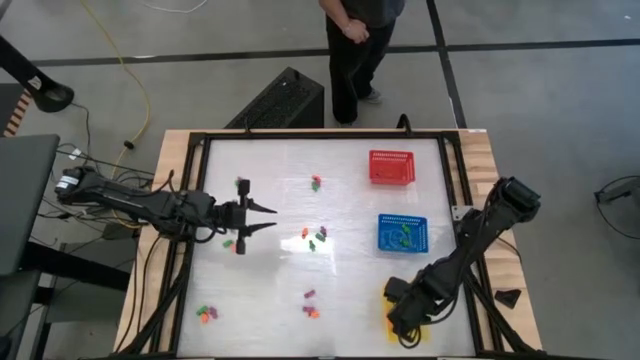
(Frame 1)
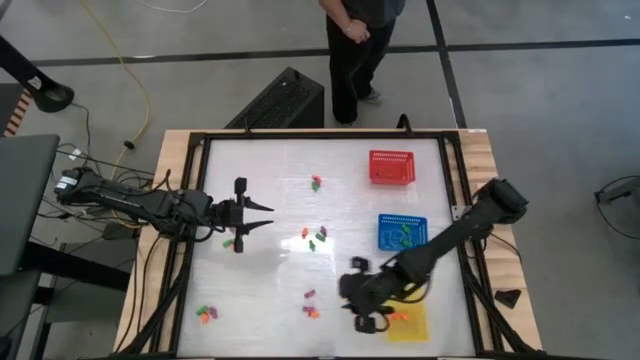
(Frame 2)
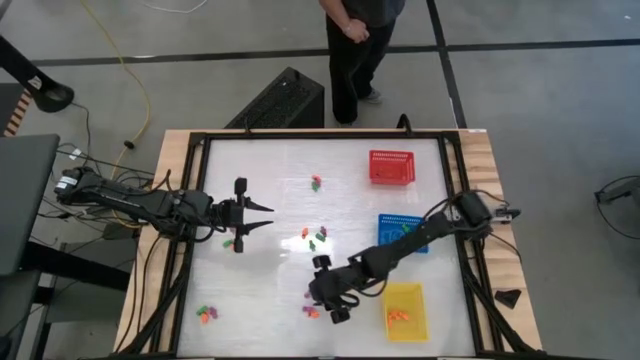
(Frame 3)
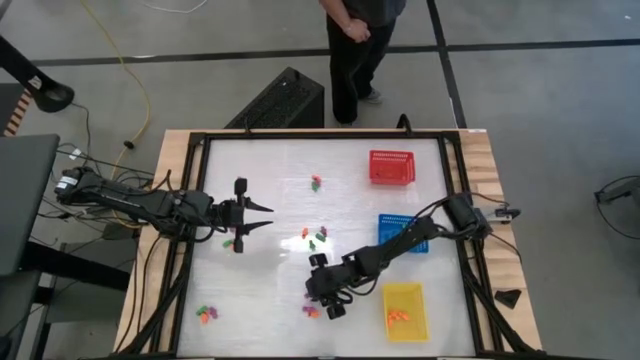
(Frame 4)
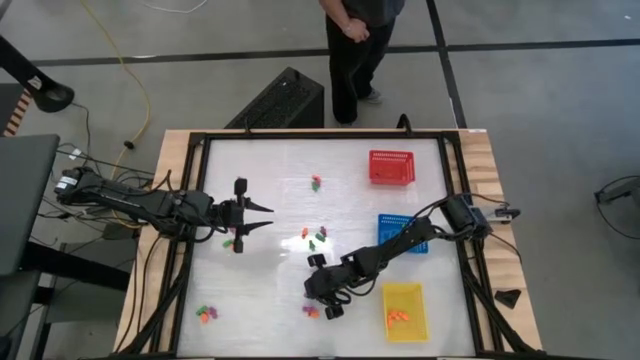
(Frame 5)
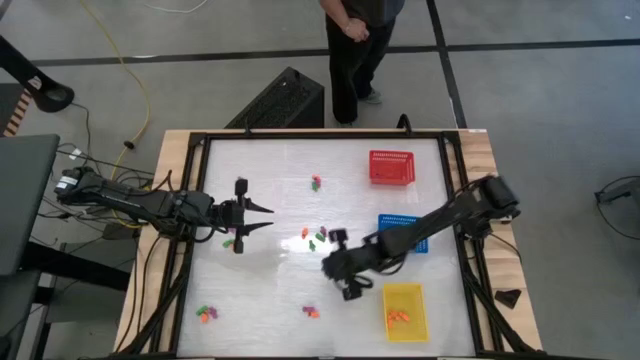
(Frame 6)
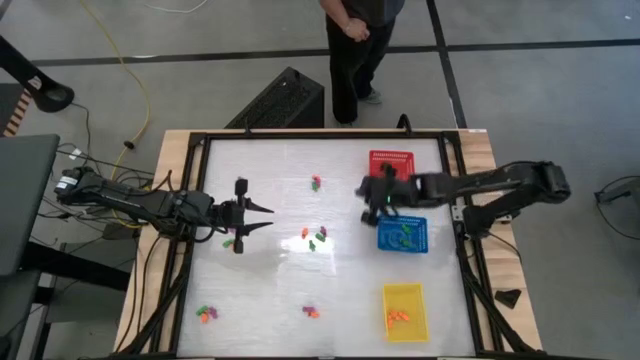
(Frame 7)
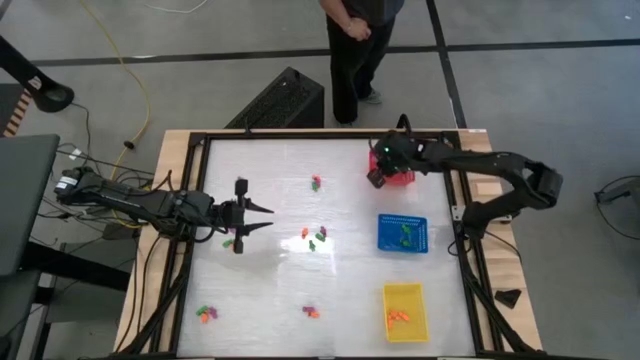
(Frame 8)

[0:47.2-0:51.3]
Task: Sort Halloween decoration
Put the violet skeleton toy into the red basket

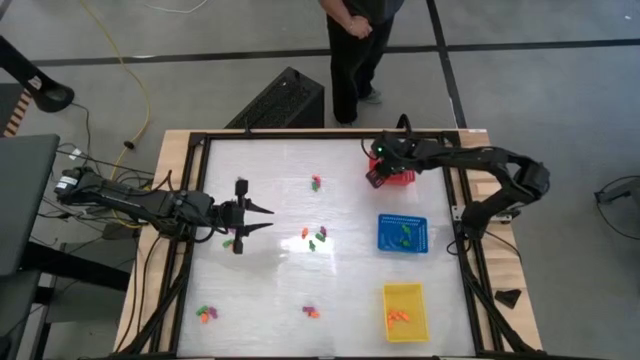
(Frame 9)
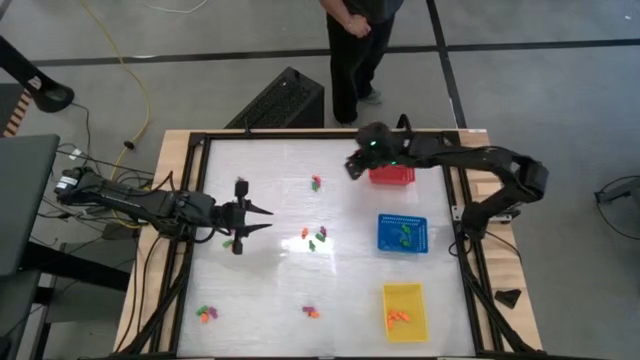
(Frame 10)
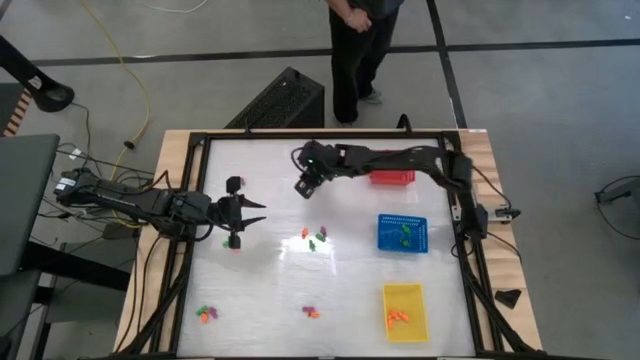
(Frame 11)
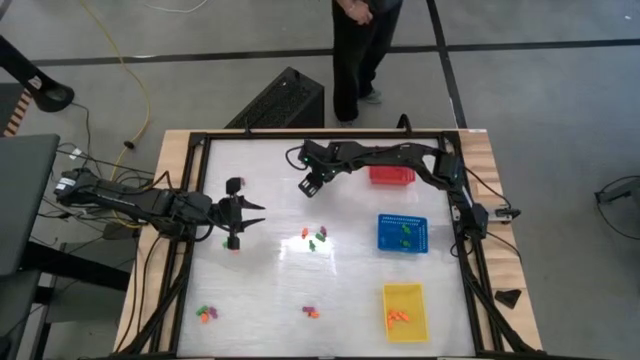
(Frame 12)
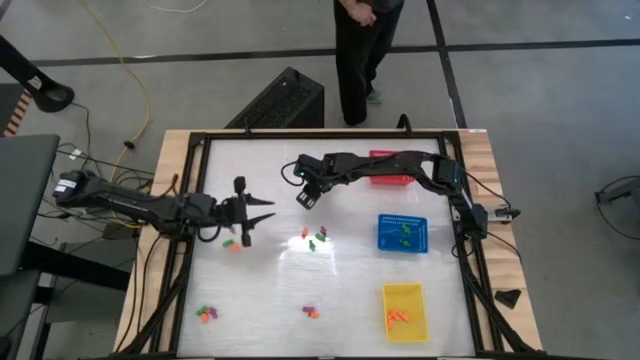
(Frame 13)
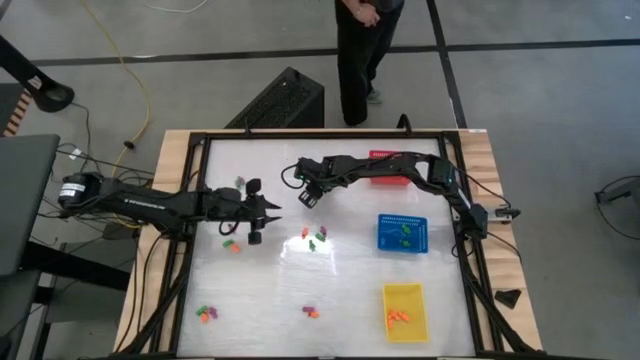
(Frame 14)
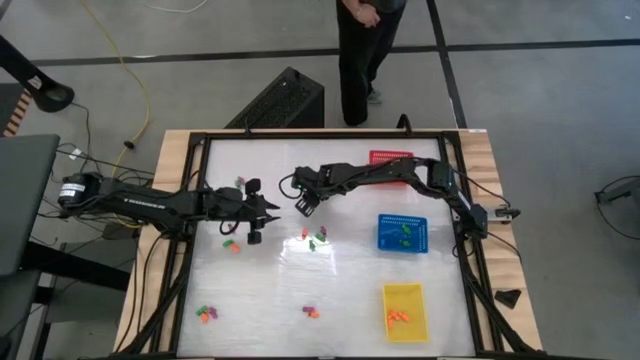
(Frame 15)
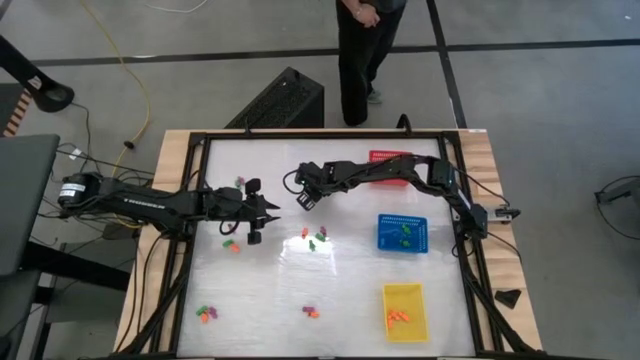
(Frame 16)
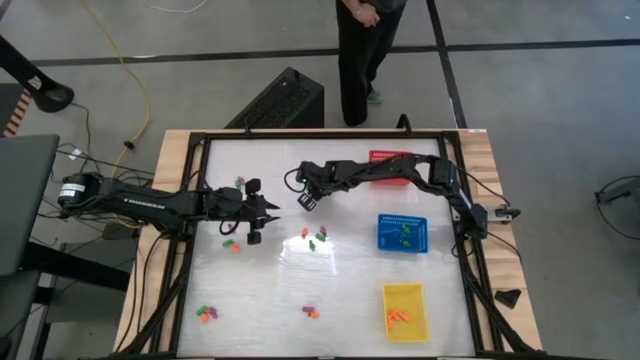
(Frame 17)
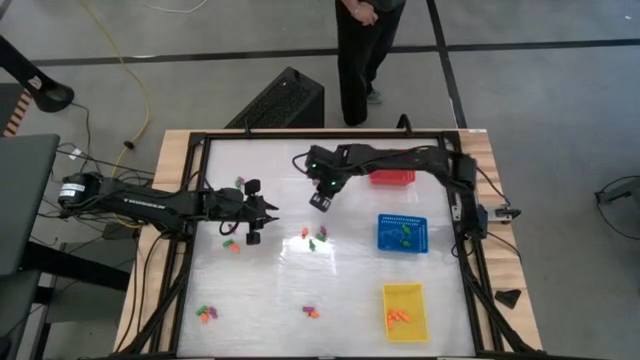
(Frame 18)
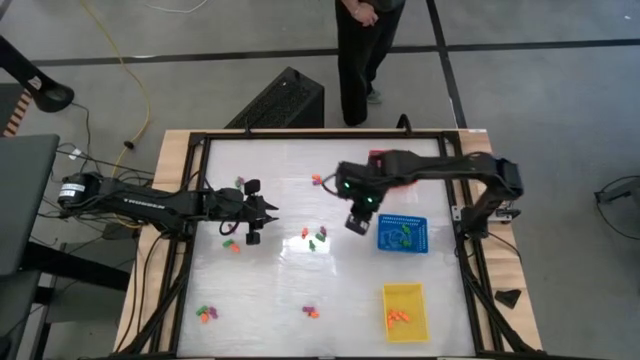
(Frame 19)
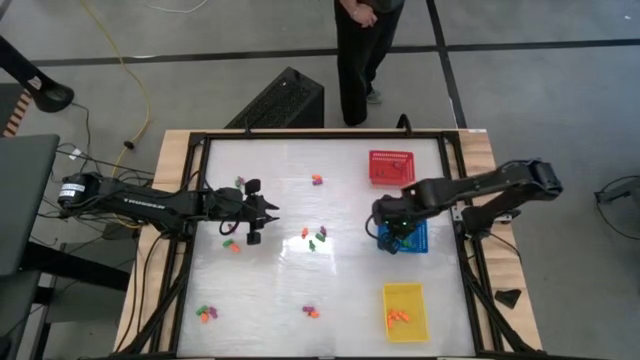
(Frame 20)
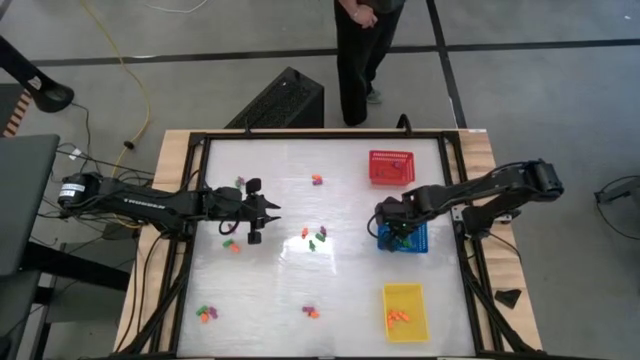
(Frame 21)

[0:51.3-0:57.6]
Put the green skeleton toy into the blue basket

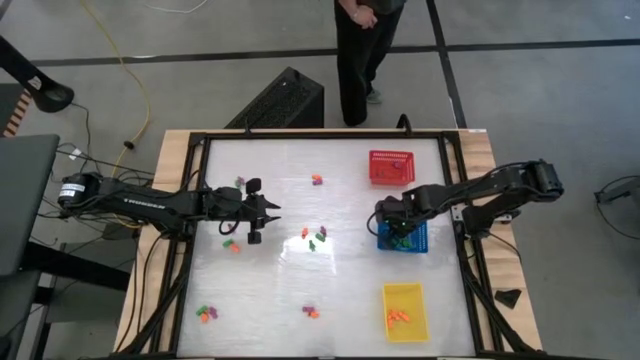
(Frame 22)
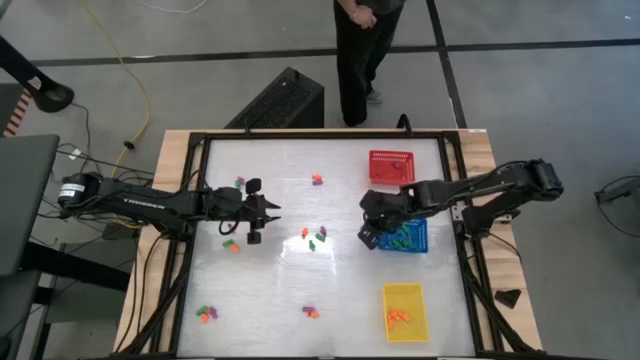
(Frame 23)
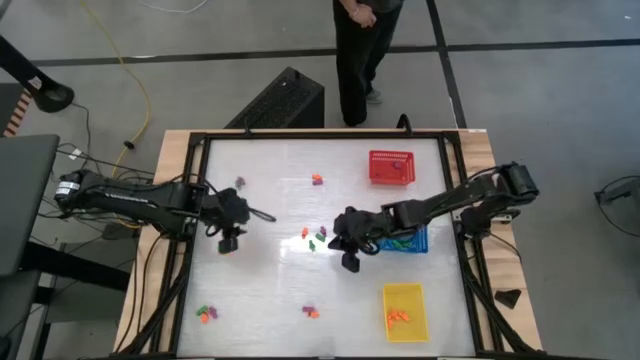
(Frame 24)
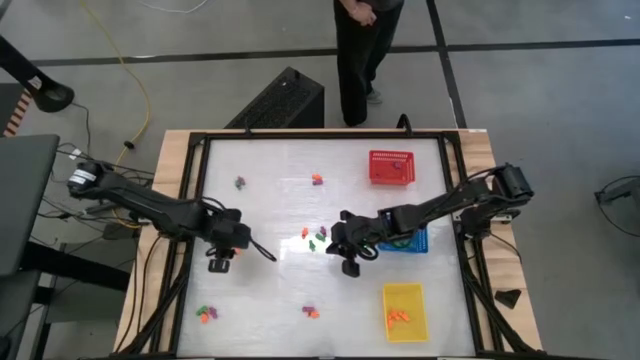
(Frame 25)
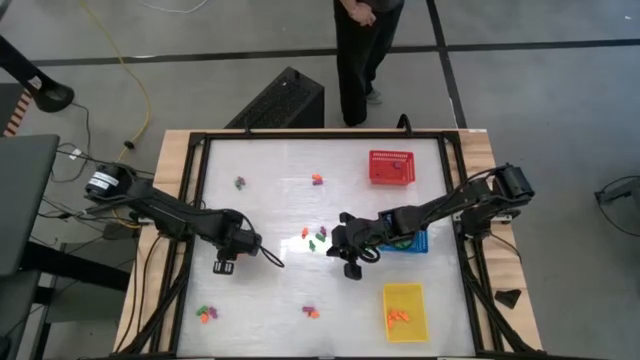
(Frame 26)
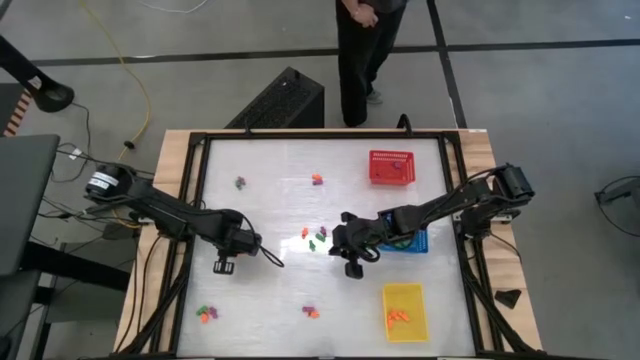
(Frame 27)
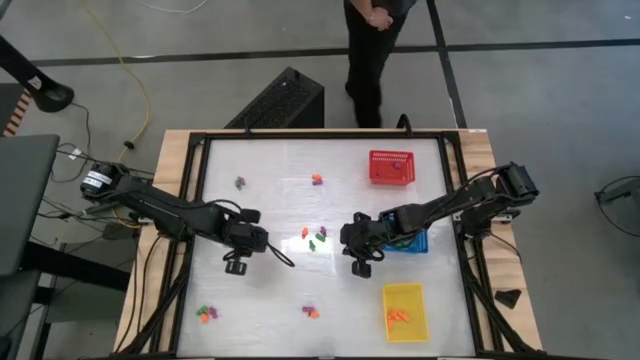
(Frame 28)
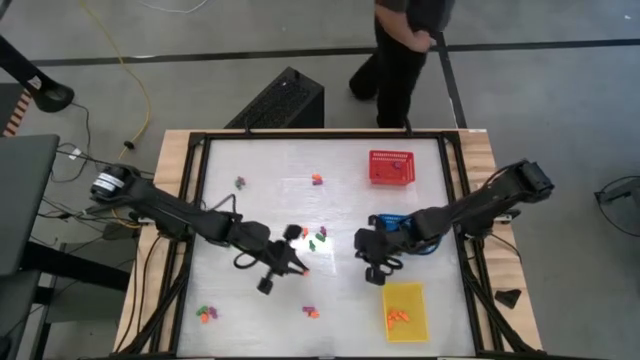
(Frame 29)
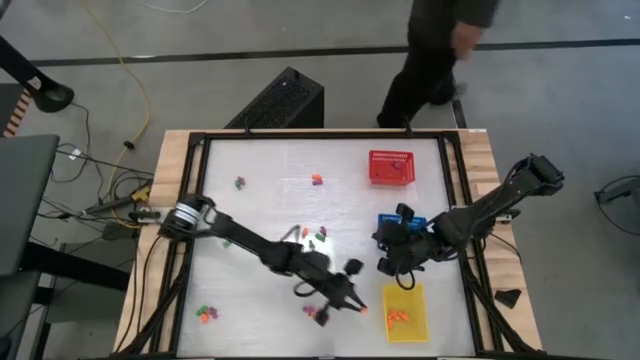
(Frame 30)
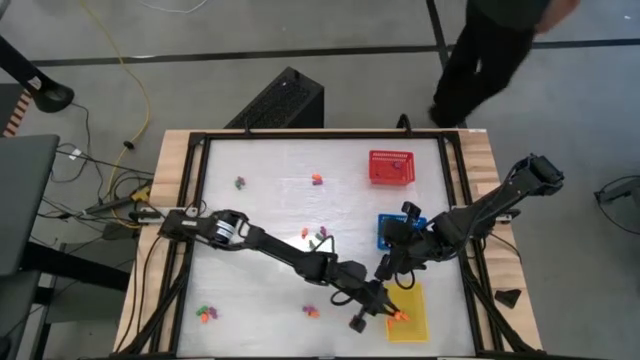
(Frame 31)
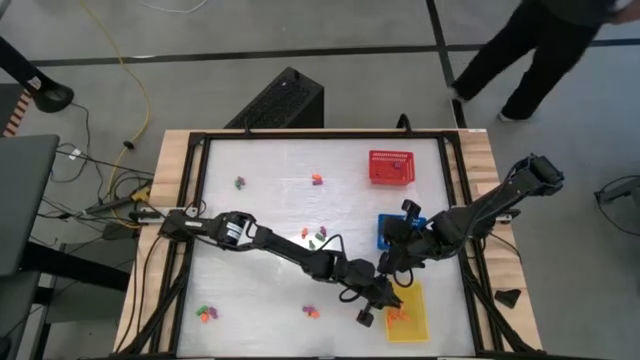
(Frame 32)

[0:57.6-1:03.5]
Put the orange skeleton toy into the yellow basket

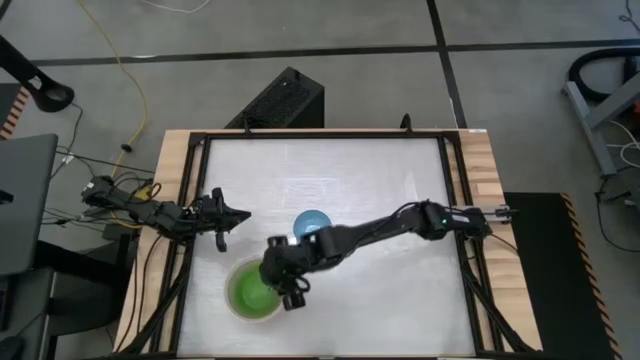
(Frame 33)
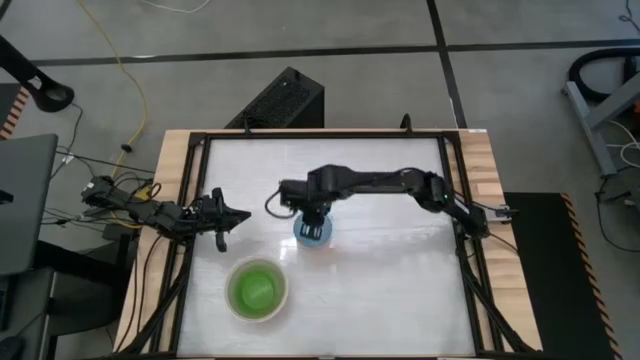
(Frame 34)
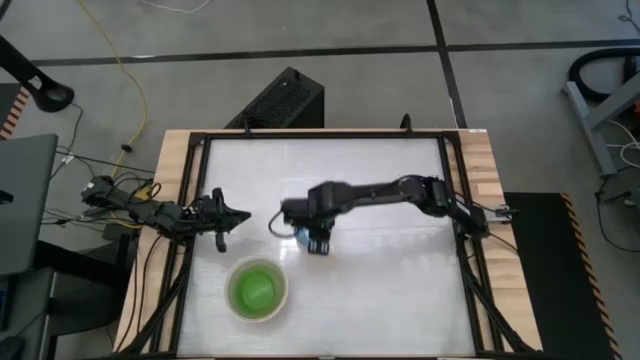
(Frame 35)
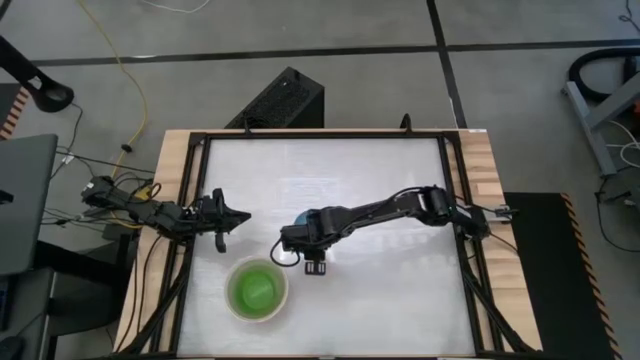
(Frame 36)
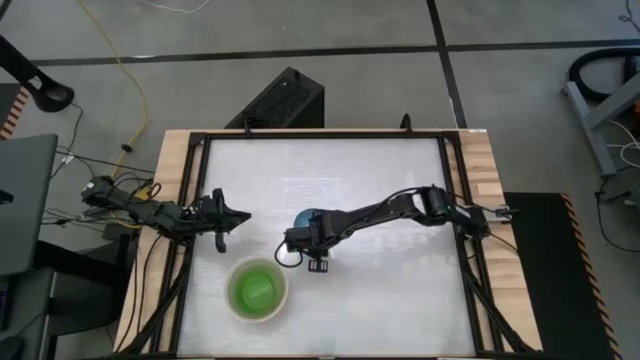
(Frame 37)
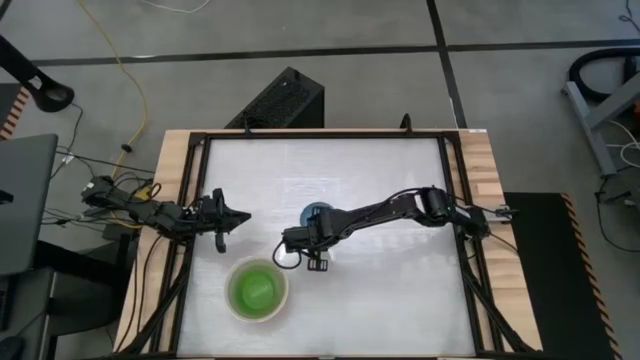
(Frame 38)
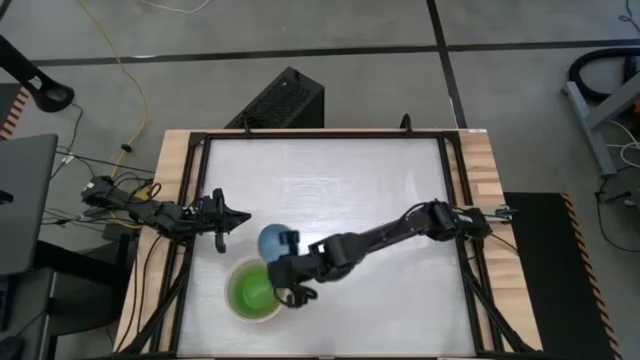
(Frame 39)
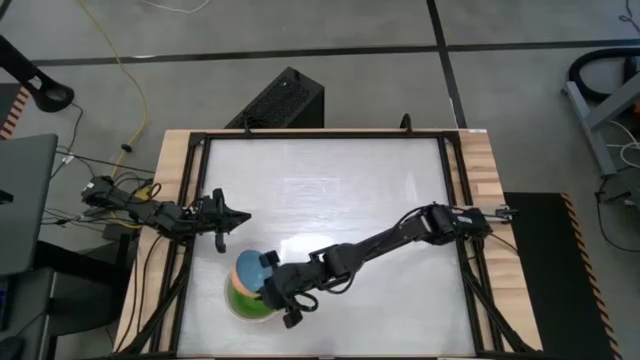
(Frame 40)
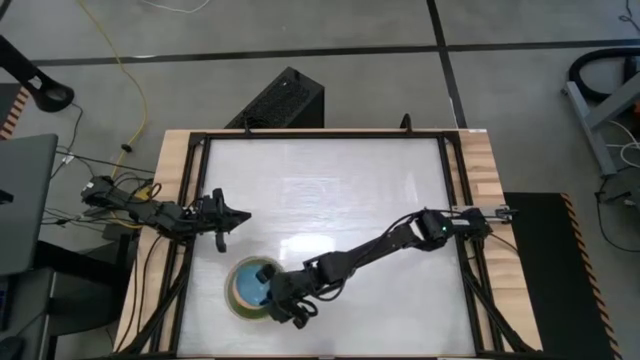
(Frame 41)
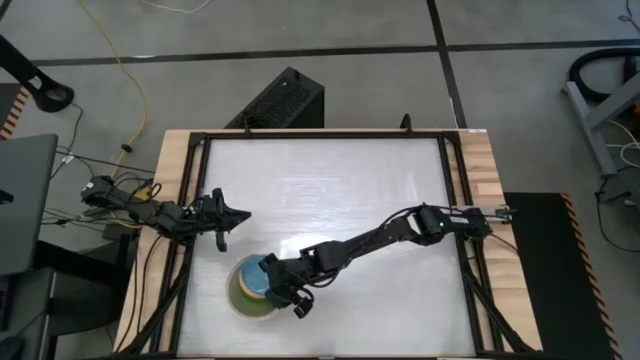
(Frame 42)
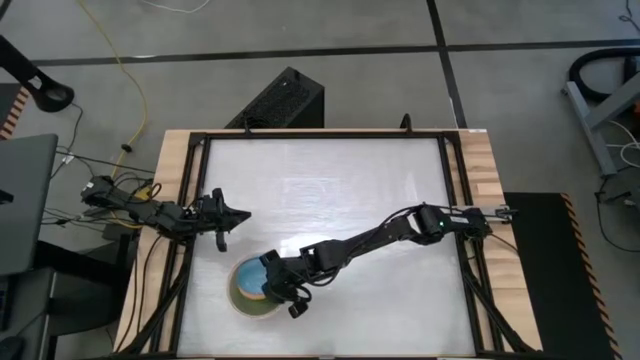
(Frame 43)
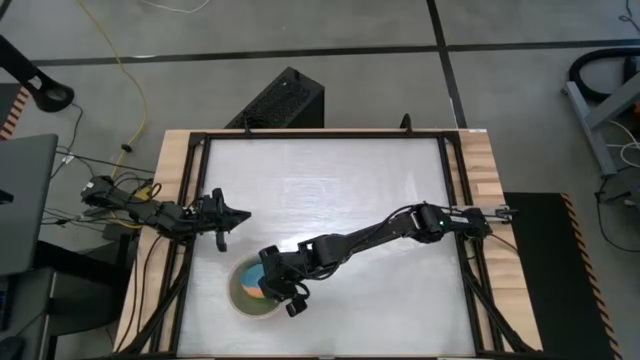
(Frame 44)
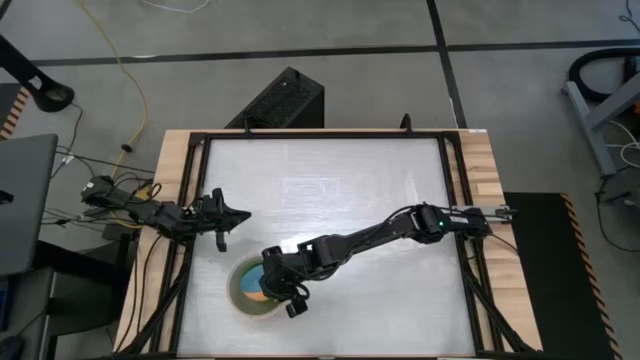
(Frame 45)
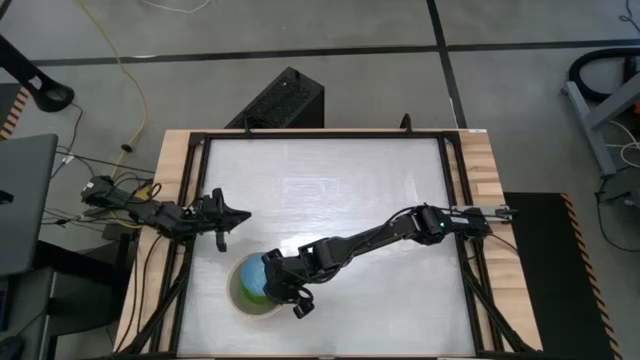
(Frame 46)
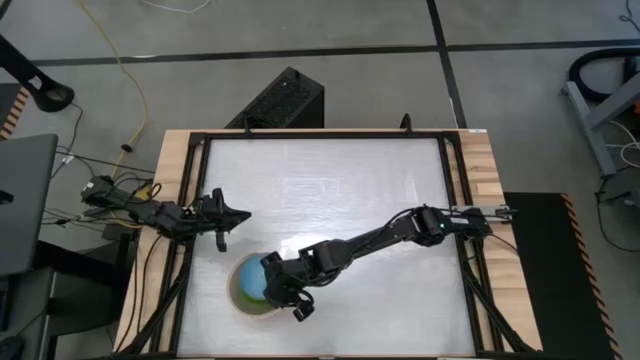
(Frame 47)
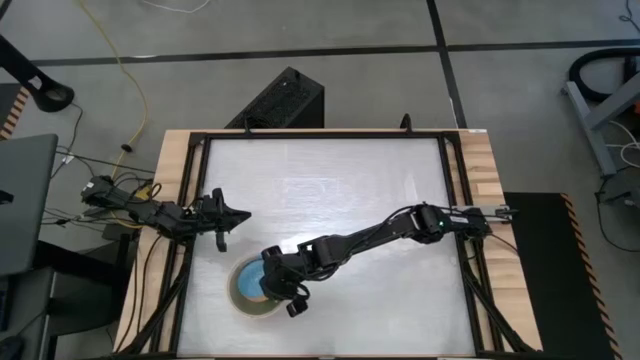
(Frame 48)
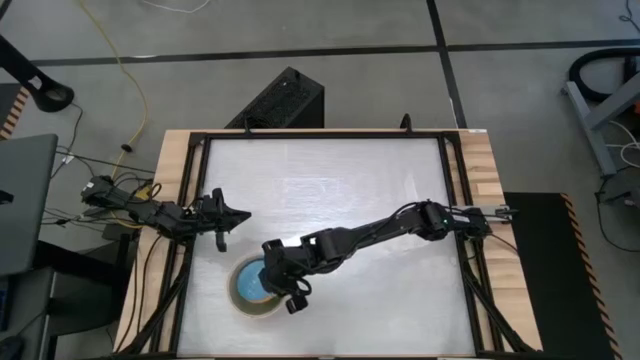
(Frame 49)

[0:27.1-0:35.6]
Task: Nest bowls inside each other by size order
Stack the blue bowl on top of the green bowl
